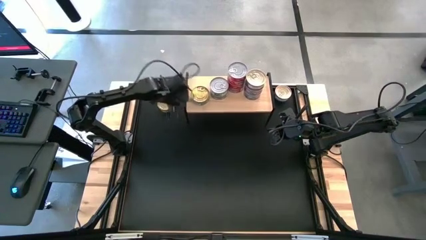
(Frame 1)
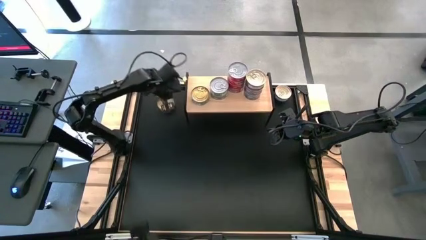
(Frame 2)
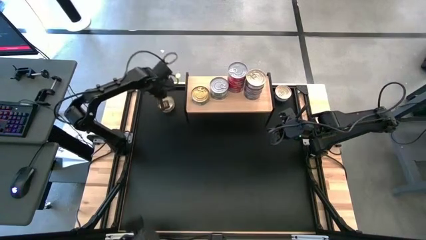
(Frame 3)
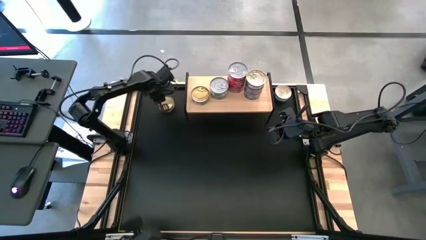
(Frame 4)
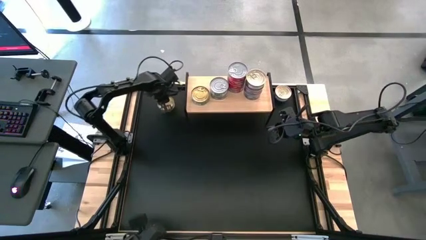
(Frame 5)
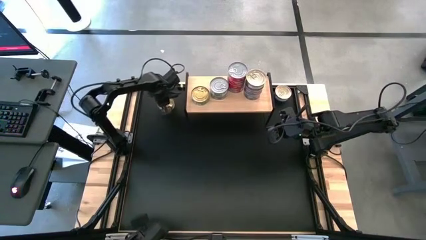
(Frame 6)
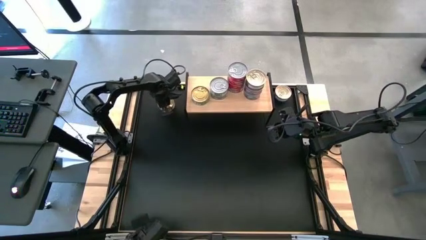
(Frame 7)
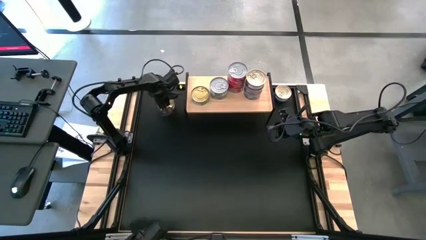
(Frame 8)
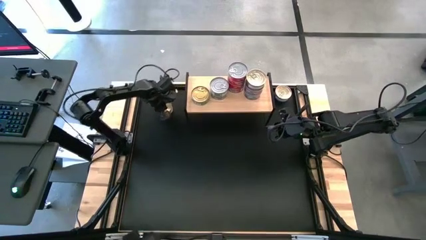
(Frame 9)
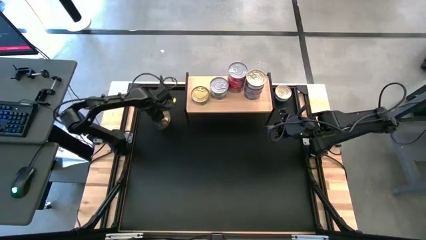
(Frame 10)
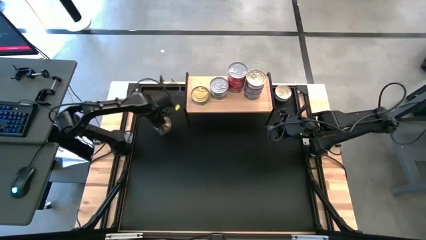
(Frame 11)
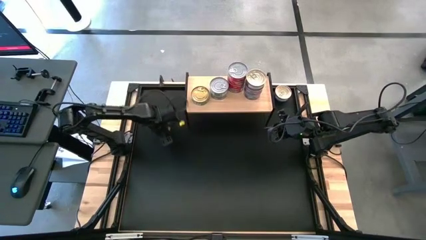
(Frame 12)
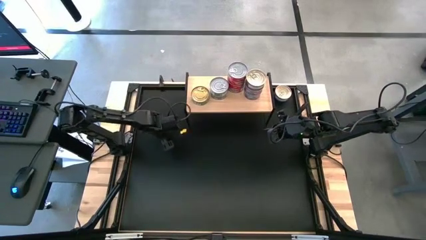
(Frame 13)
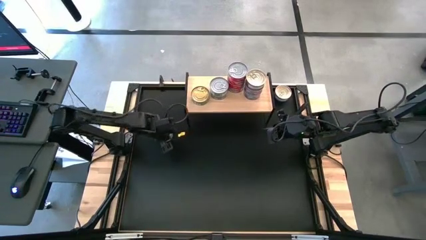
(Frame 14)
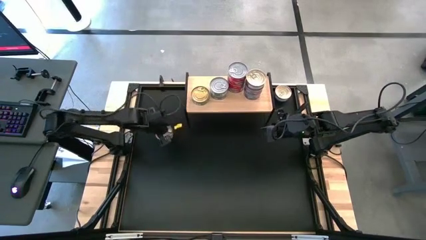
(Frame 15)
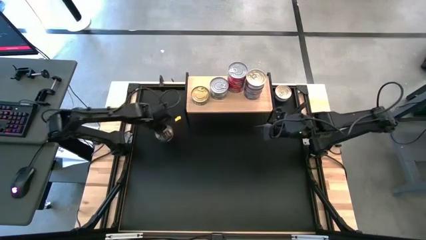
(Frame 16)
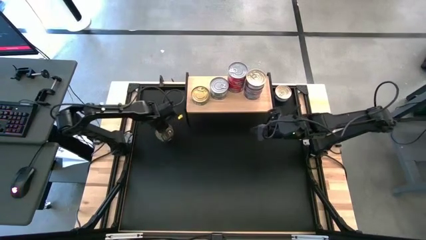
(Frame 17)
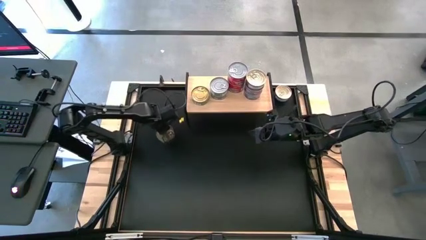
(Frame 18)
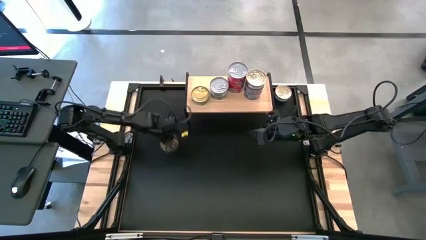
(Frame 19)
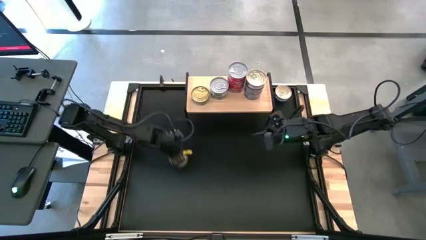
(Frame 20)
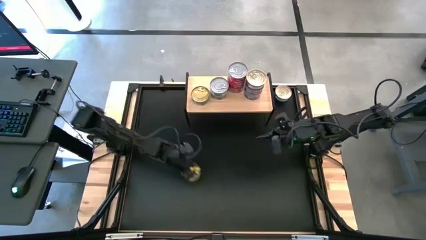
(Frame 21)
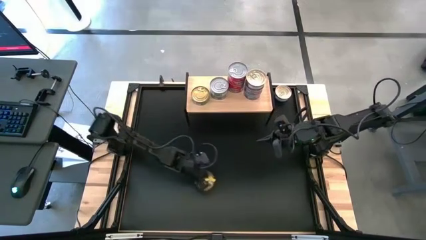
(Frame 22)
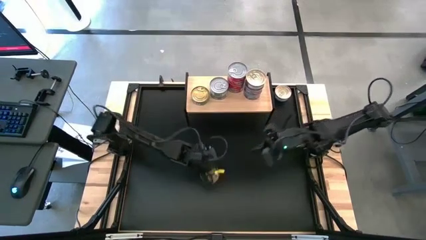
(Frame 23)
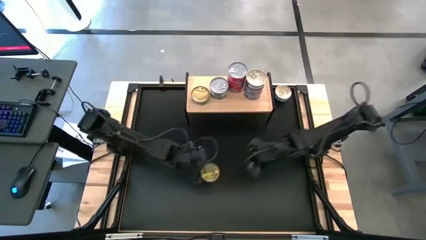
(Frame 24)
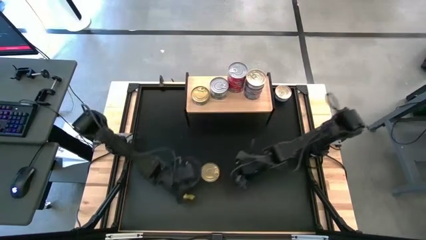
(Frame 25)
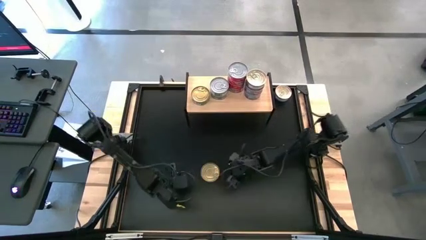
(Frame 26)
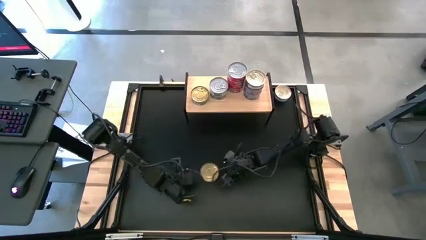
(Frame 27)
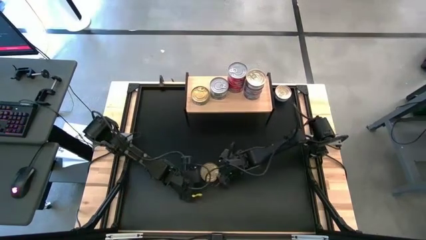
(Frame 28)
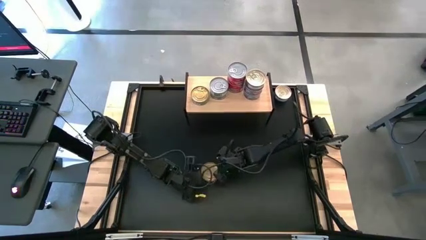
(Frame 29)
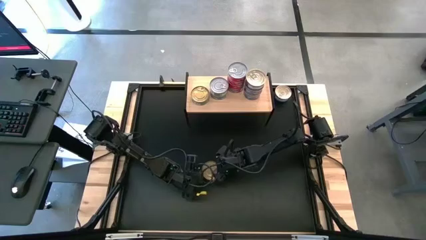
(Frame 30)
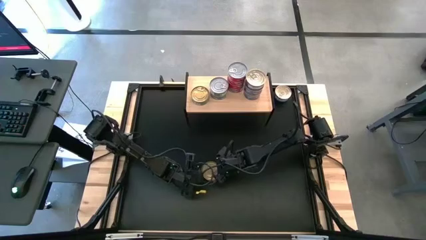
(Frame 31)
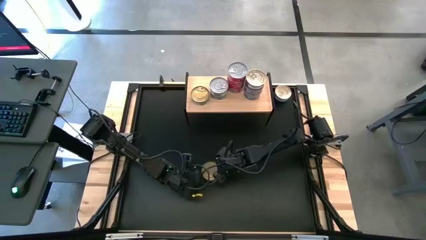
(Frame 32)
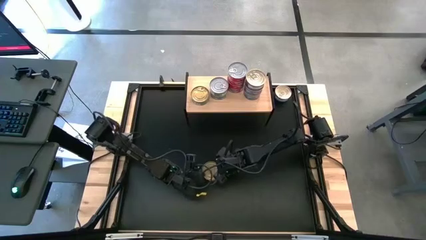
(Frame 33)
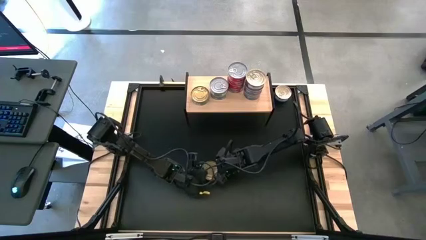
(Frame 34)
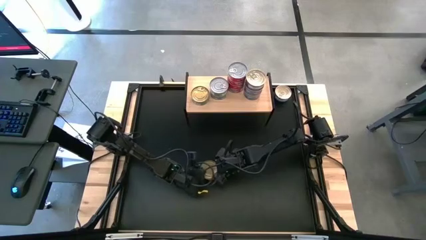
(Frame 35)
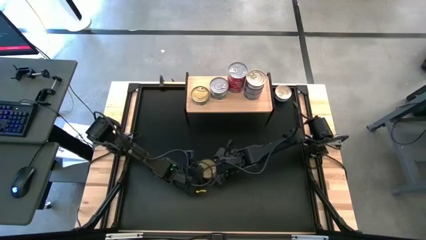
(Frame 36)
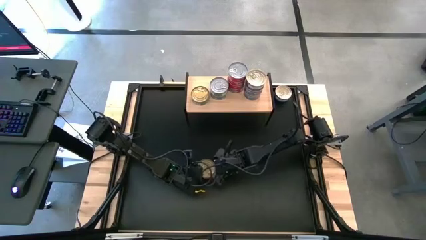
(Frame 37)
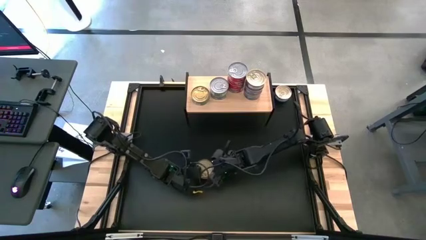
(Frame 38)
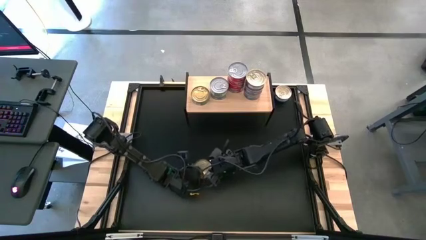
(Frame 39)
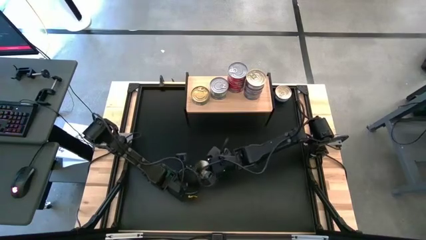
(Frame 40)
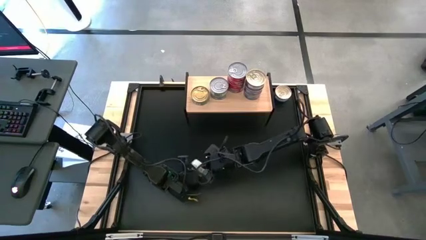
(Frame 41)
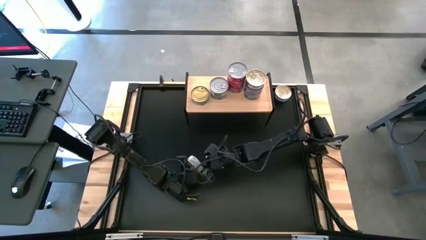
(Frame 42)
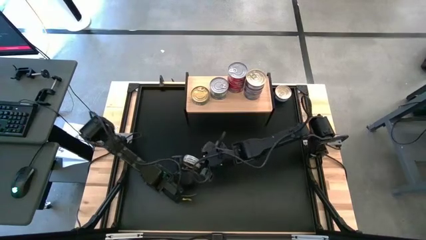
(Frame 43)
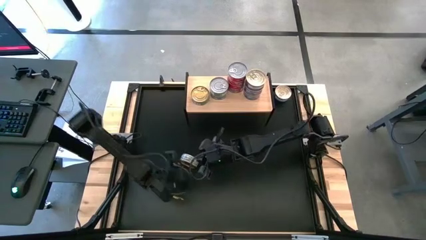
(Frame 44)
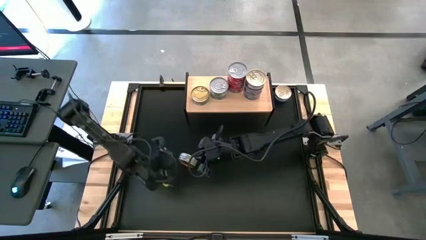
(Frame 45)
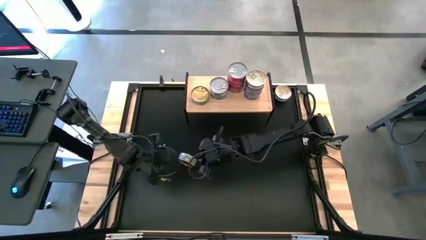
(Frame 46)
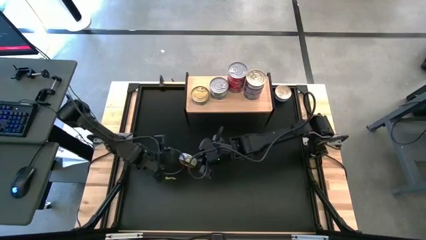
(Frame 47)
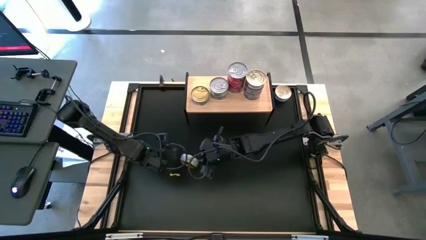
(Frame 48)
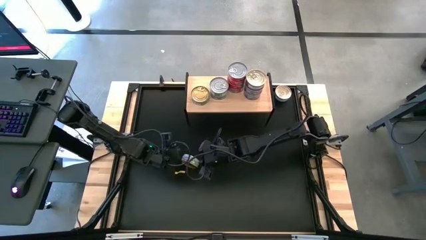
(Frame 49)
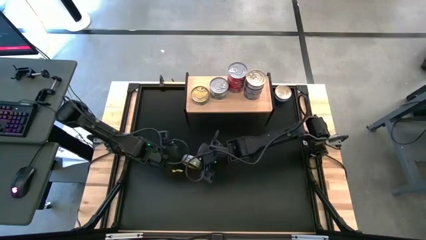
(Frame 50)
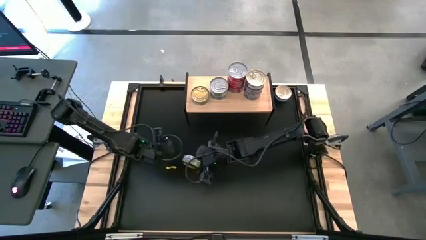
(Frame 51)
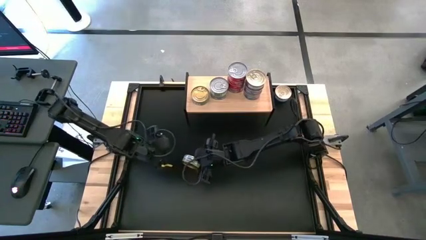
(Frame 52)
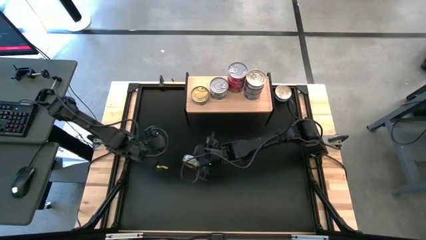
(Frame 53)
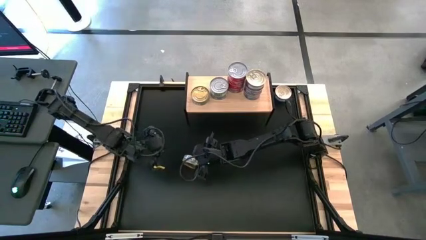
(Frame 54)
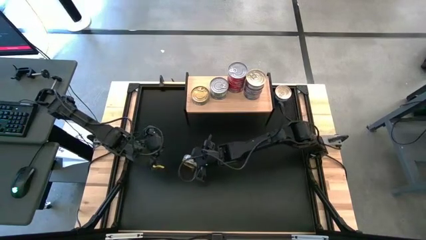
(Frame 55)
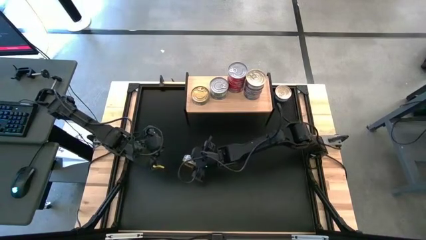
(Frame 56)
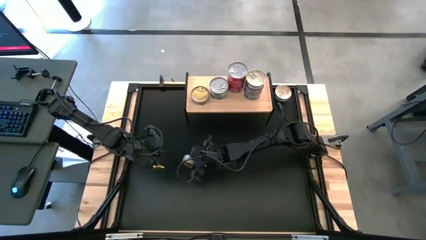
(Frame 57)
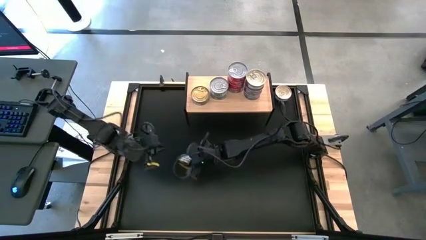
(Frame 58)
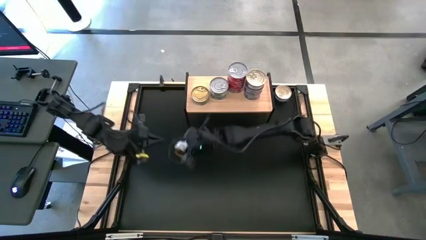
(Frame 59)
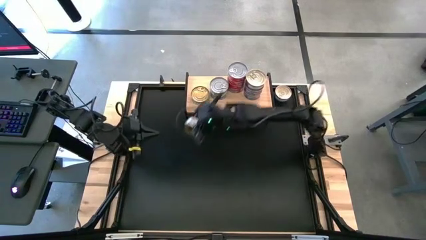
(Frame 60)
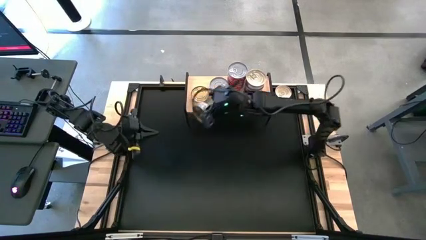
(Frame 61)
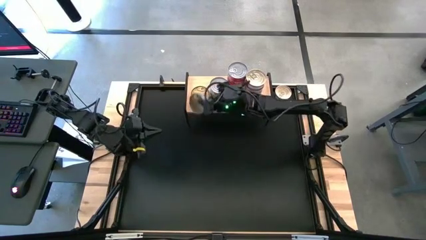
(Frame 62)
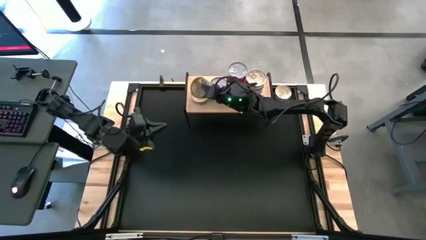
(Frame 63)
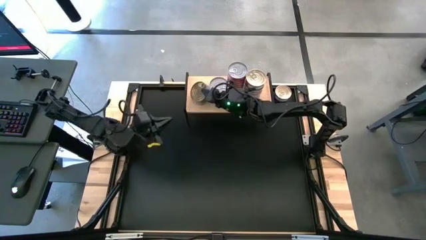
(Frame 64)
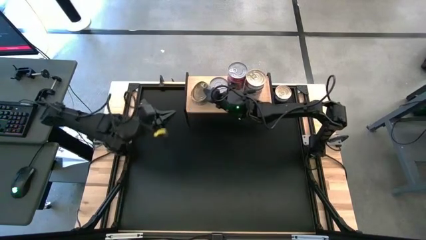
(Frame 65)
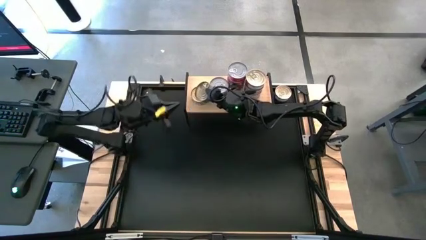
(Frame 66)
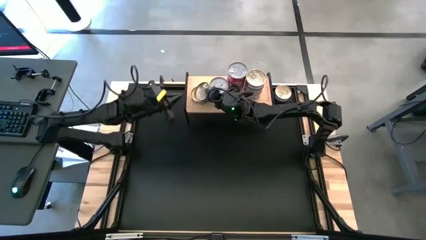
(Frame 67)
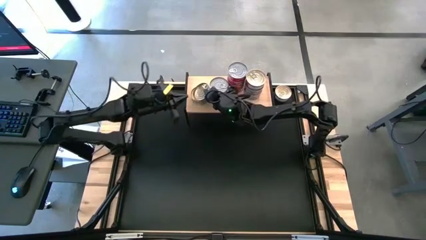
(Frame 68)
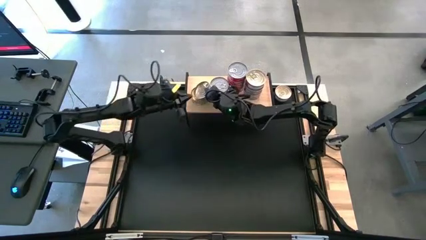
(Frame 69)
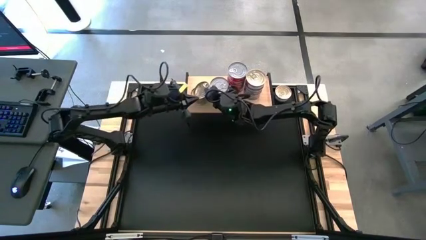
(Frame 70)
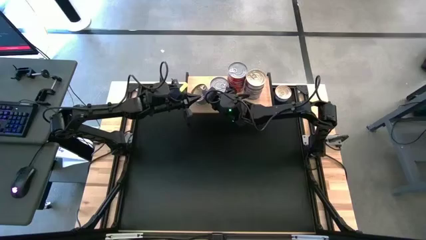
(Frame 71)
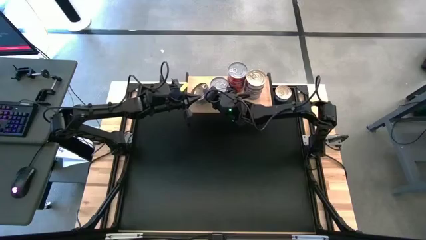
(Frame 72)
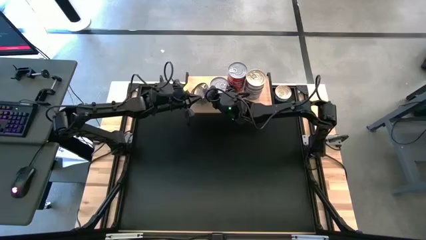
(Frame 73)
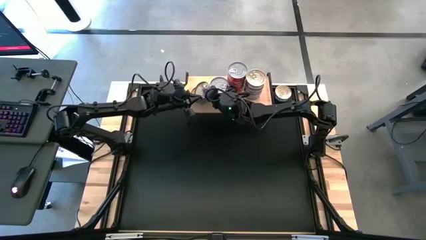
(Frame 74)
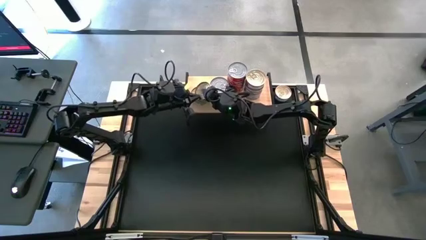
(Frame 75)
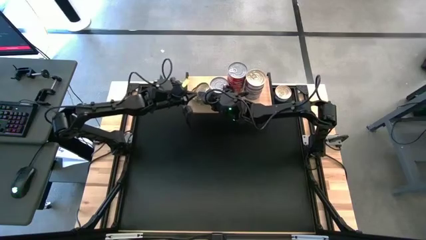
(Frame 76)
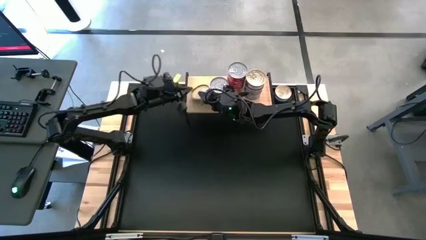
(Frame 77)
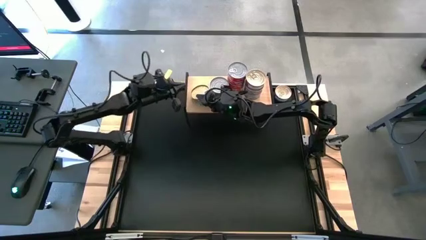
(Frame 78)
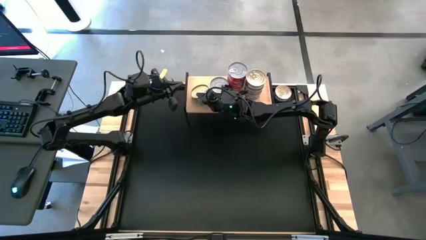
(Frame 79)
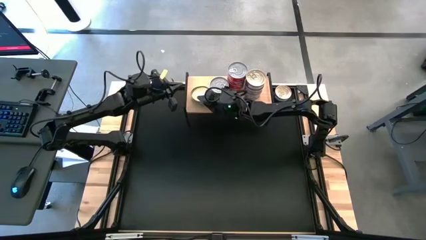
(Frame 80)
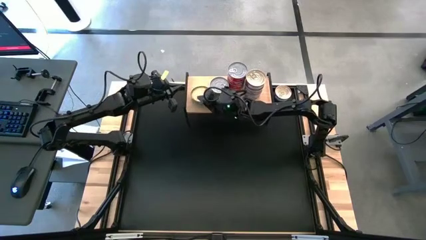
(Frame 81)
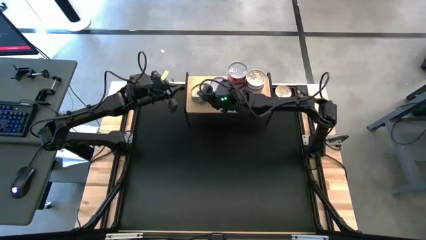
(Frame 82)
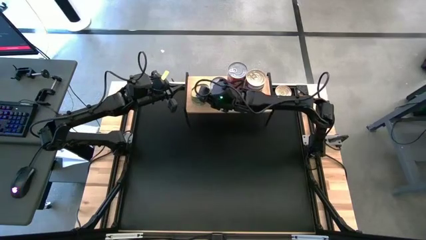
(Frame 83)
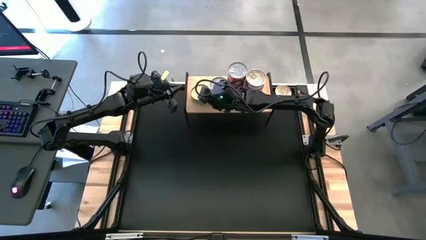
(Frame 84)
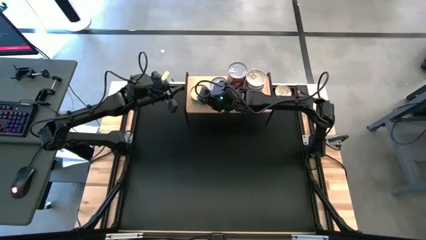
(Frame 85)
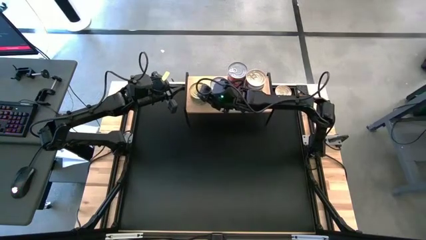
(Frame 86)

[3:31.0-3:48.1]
Task: Stack canned seafood by type on shelf
Stack the green tuna can on top of the green tuna can on the shelf
